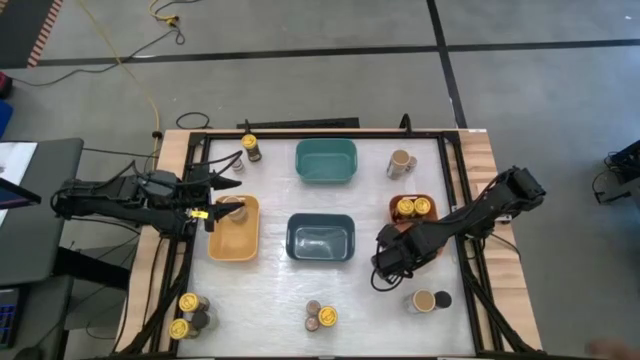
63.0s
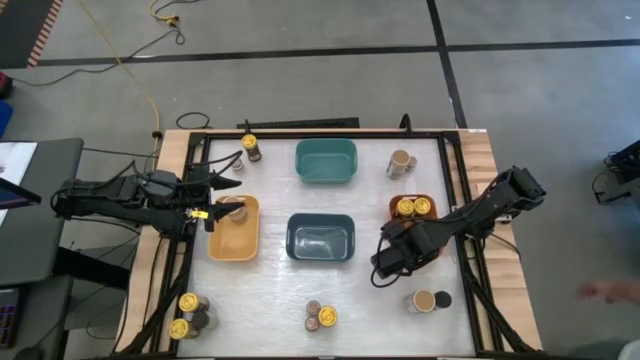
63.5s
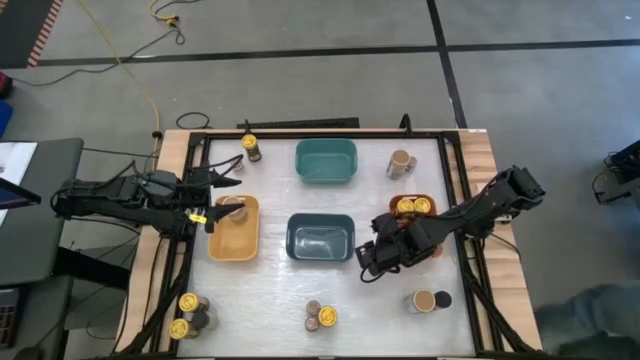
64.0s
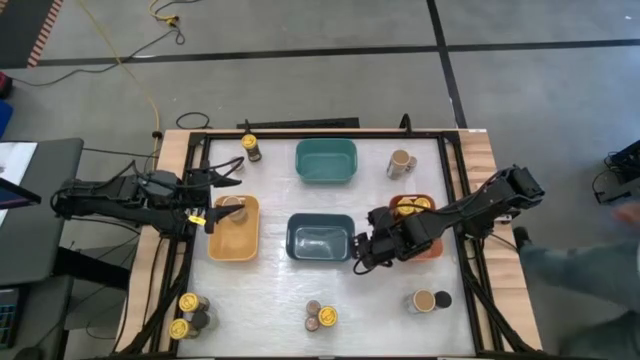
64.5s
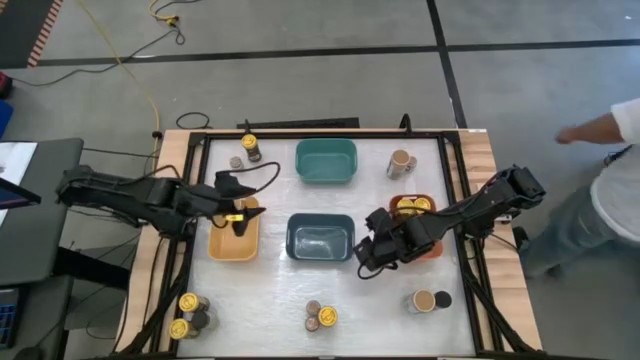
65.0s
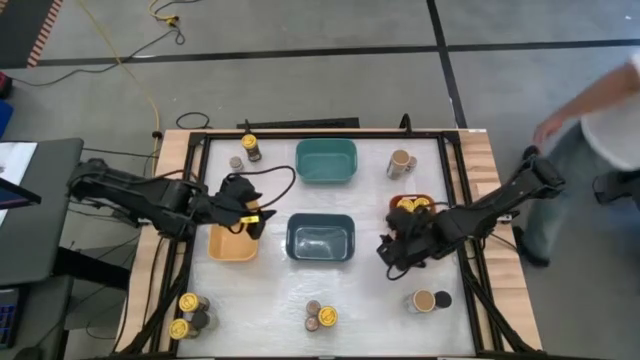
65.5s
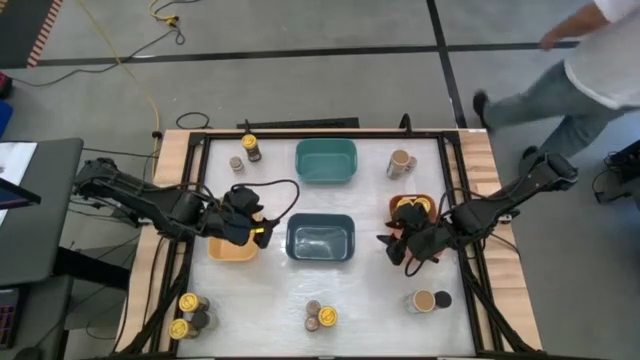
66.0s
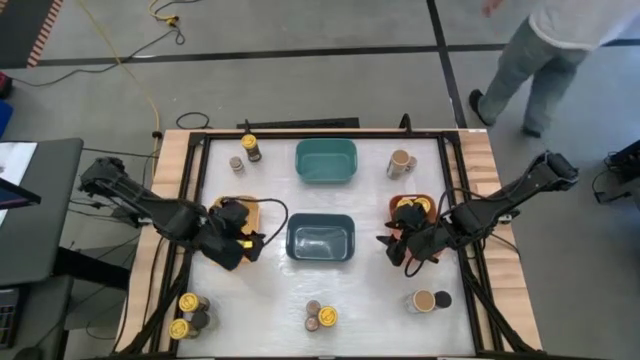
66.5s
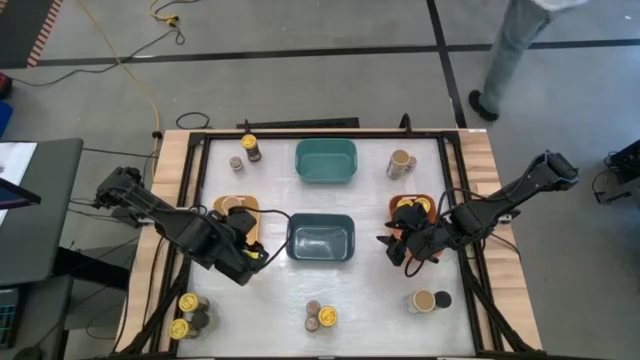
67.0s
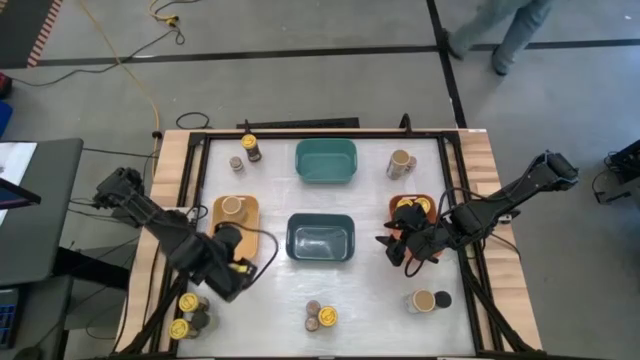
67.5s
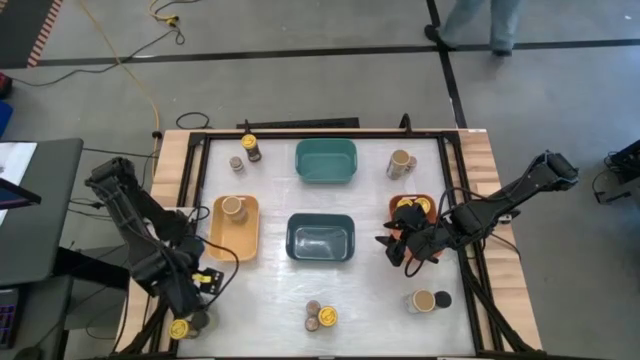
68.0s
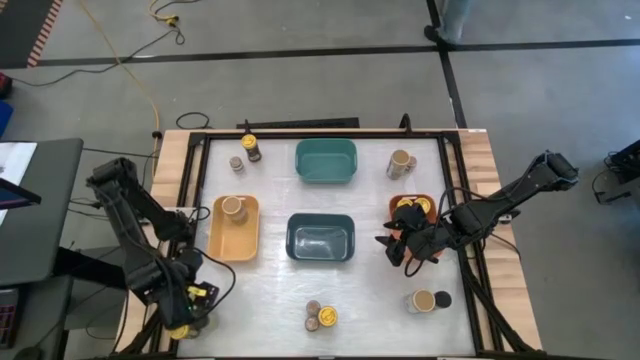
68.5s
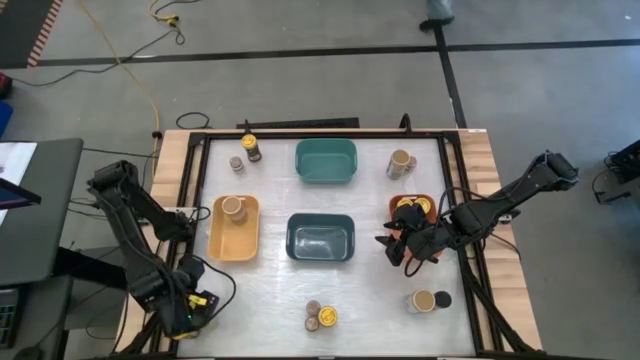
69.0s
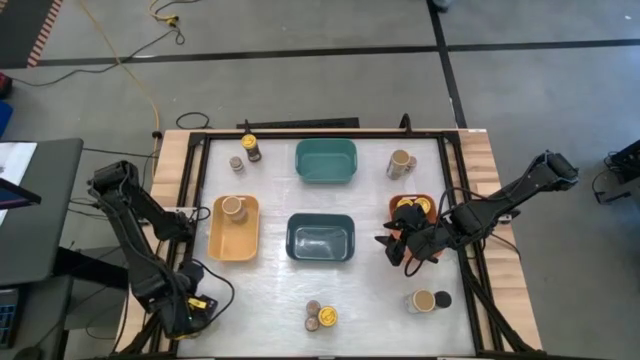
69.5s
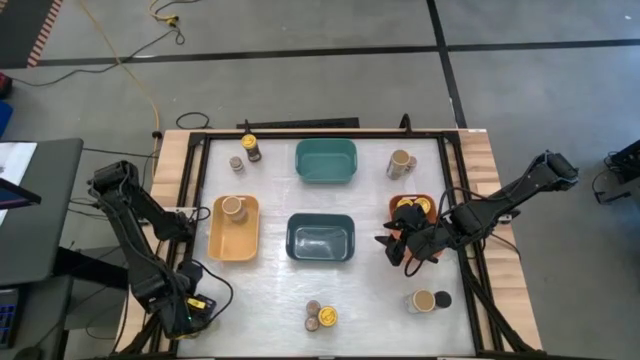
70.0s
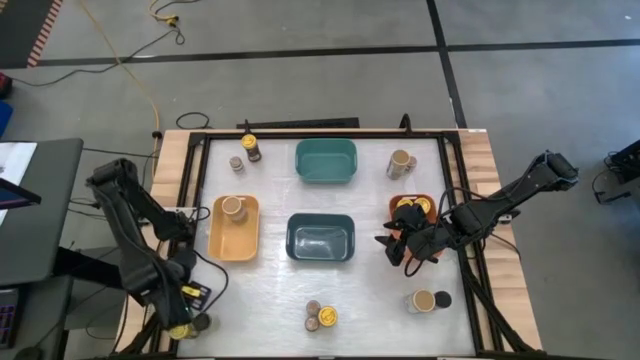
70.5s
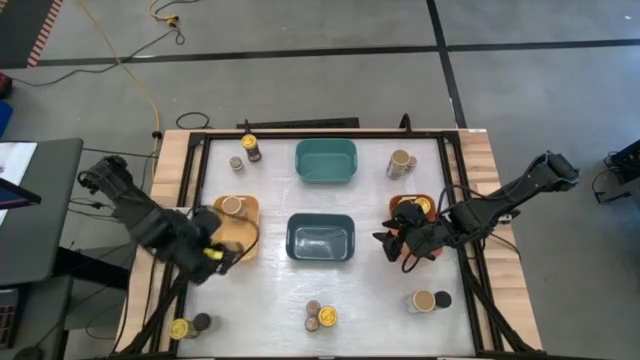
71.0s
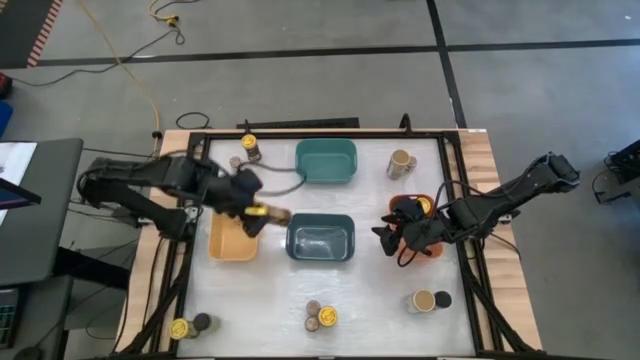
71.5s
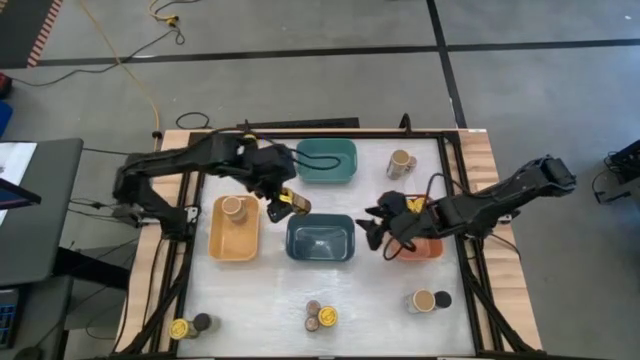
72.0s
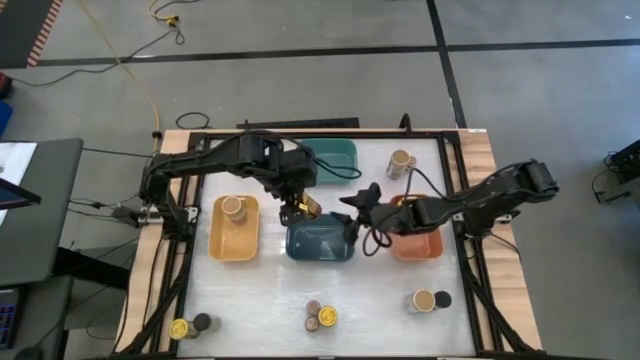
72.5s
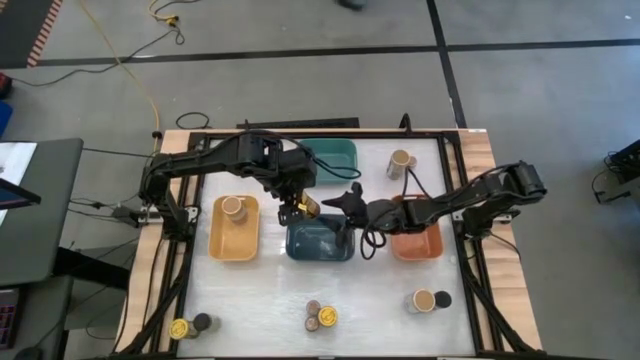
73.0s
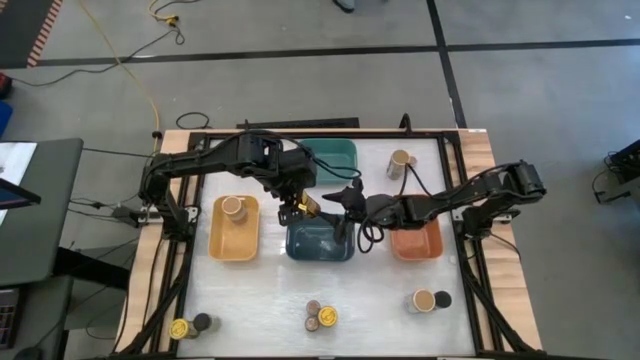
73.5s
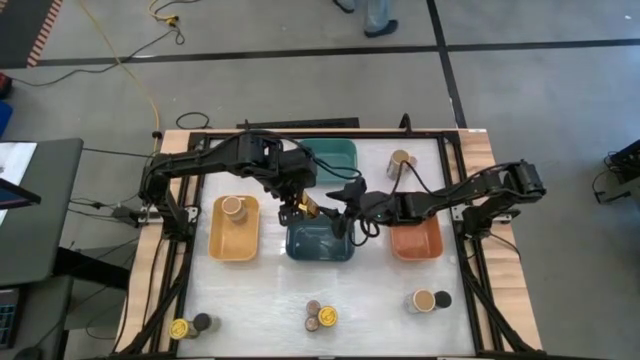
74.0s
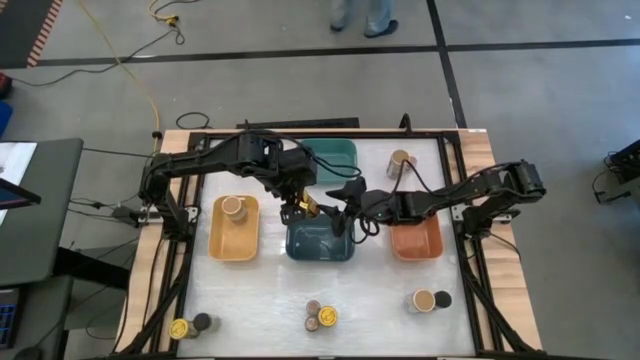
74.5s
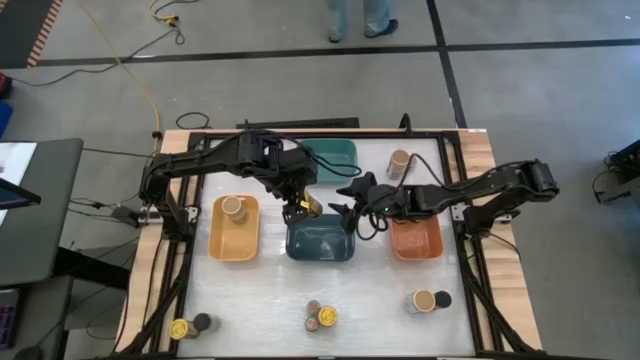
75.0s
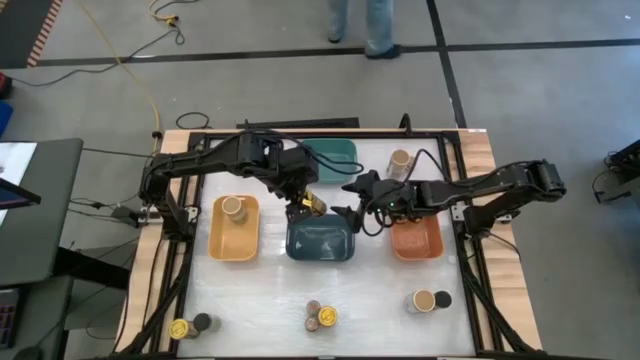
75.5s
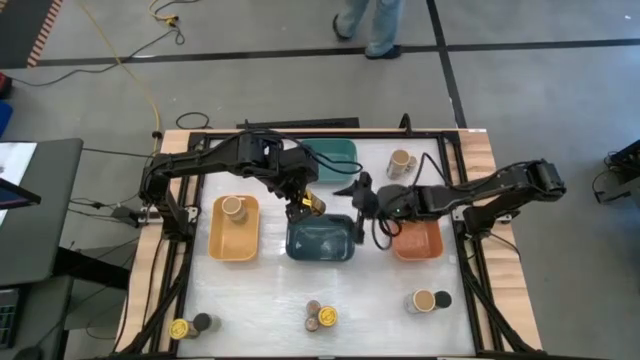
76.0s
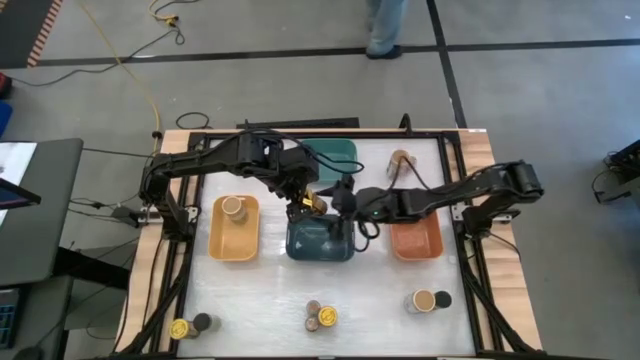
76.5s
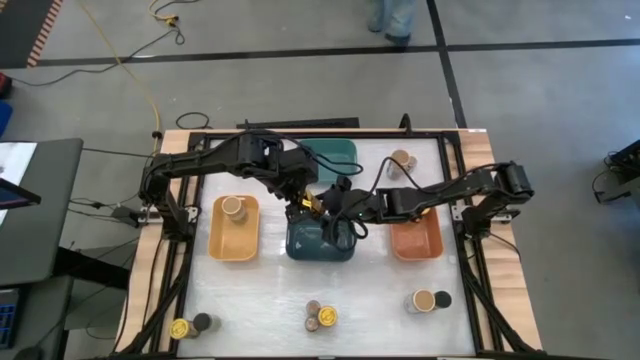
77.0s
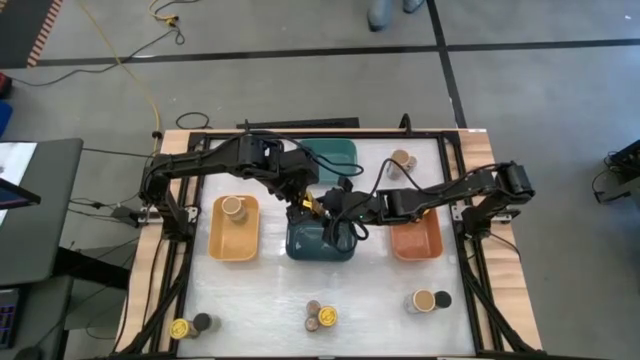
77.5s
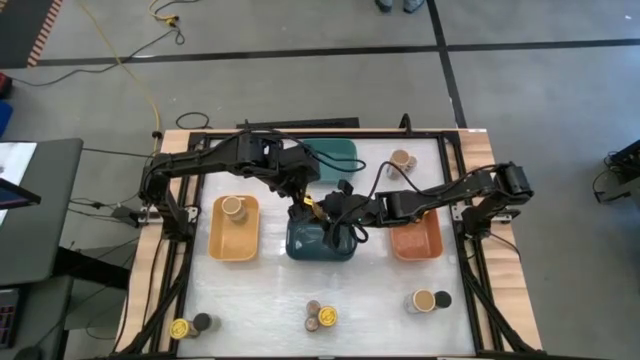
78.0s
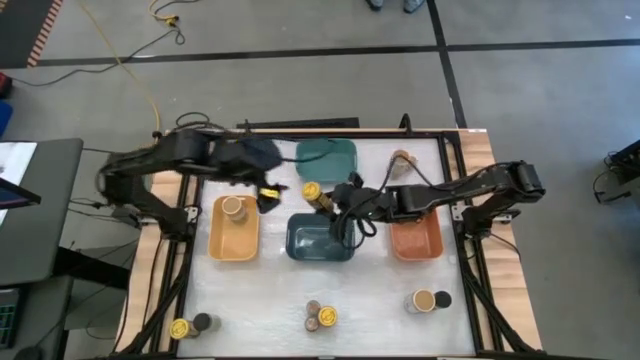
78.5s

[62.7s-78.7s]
Task: Sort spices by type
Put the yellow seasoning bottle into the orange bin

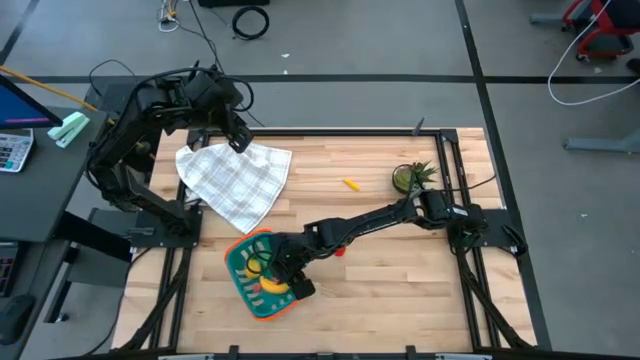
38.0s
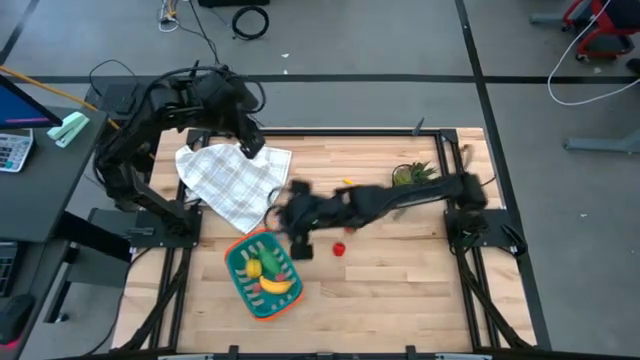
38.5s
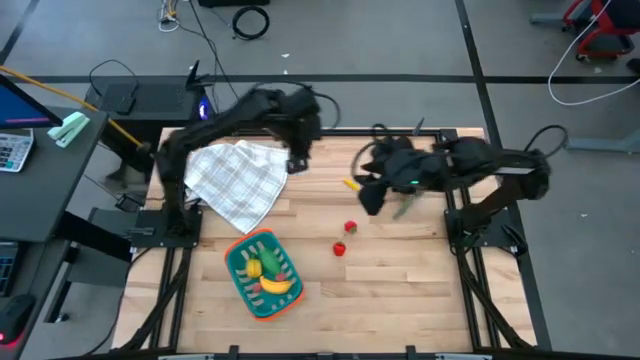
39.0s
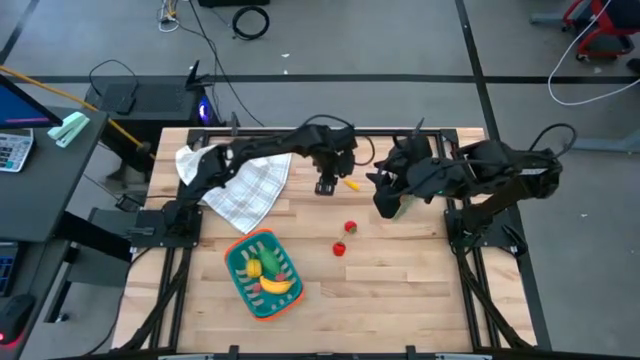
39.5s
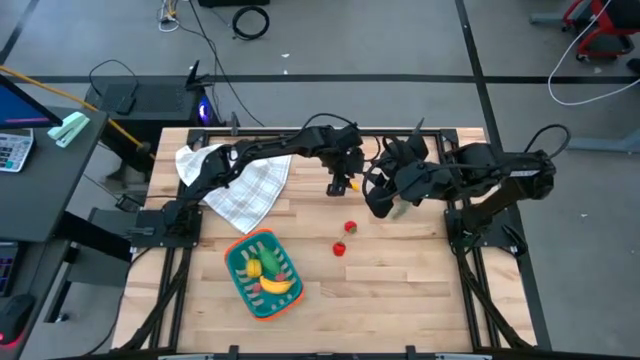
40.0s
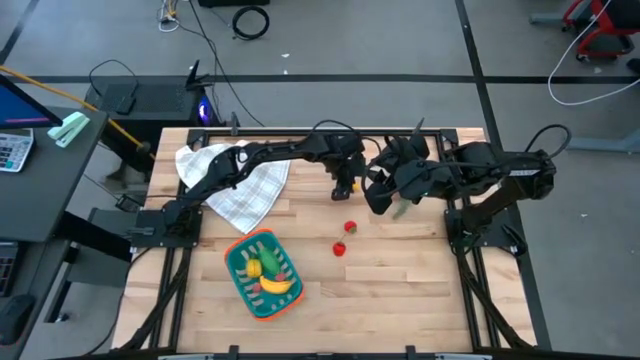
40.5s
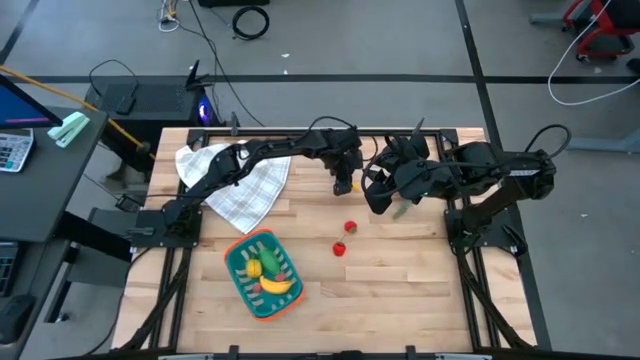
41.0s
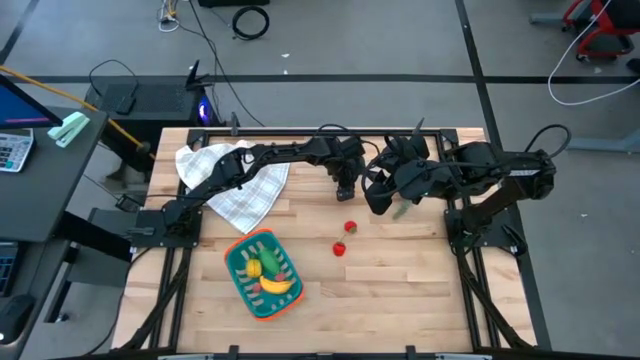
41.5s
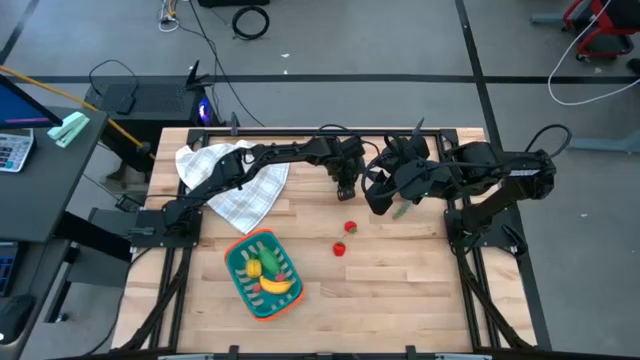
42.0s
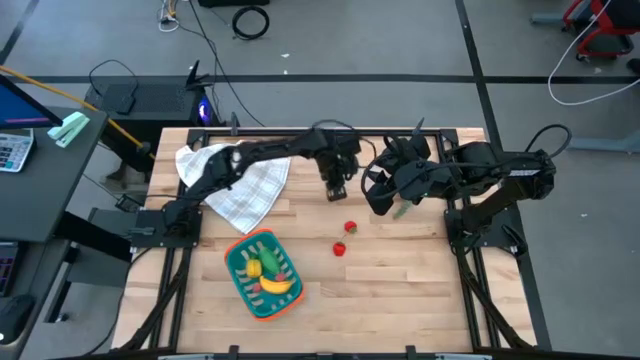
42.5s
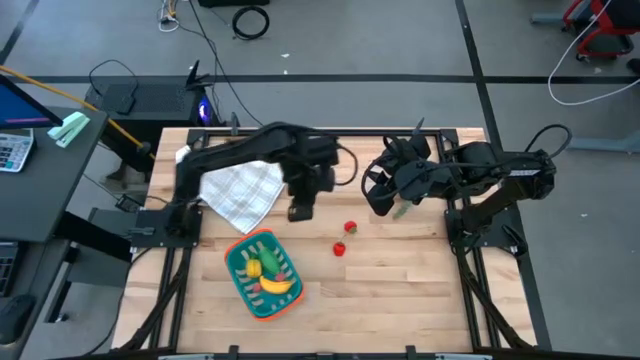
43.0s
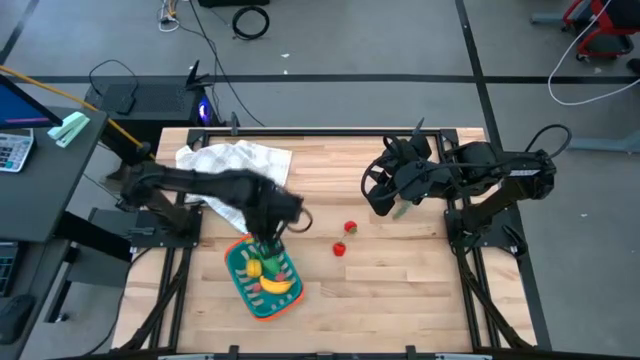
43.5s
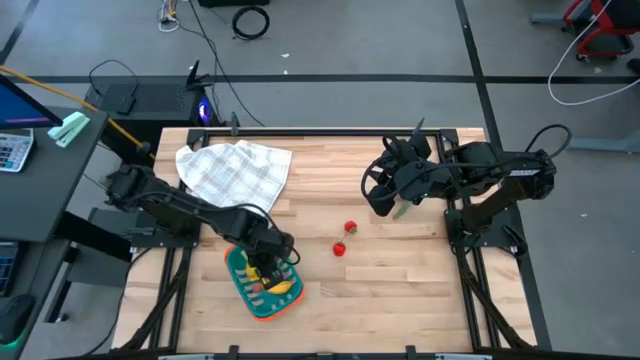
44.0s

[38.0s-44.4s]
Task: Pick and placing Produce into tupperware
Put the yellow corn into the blue basket
